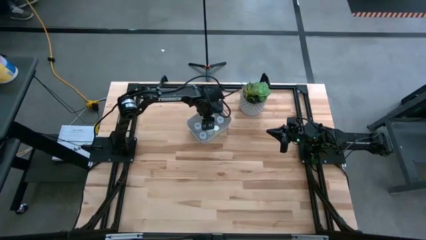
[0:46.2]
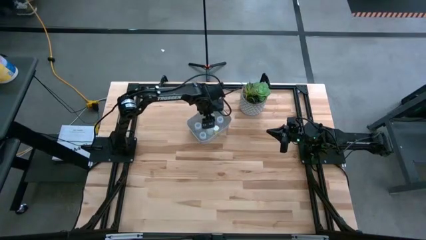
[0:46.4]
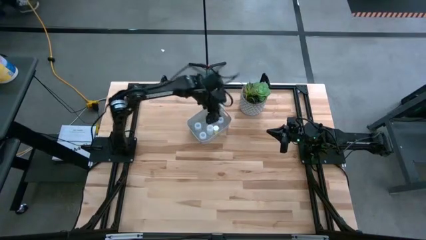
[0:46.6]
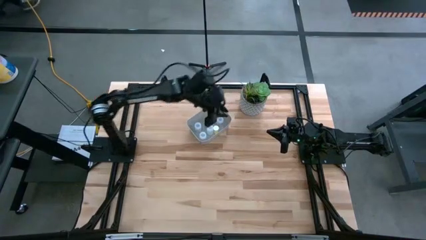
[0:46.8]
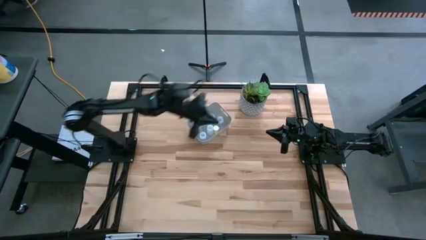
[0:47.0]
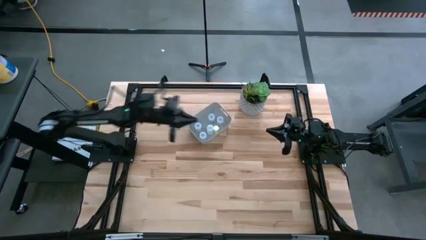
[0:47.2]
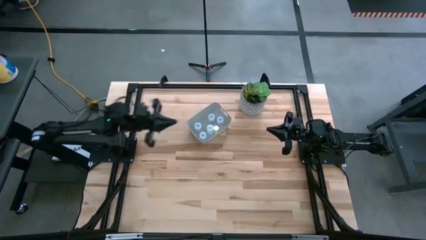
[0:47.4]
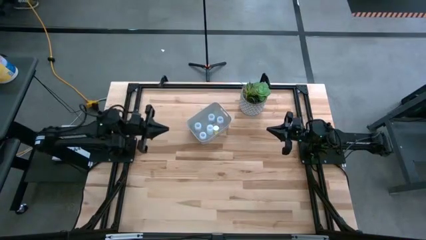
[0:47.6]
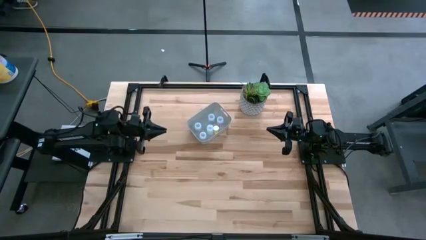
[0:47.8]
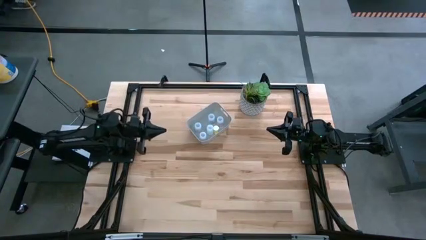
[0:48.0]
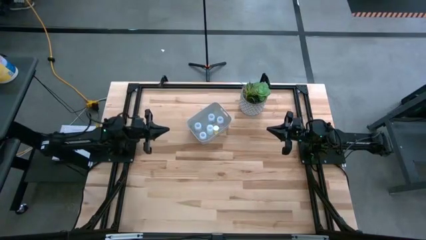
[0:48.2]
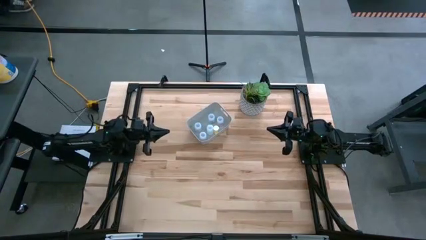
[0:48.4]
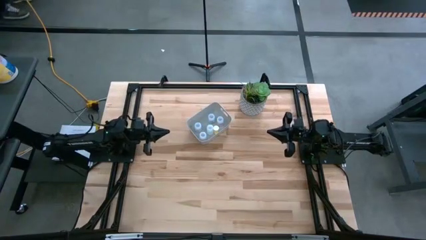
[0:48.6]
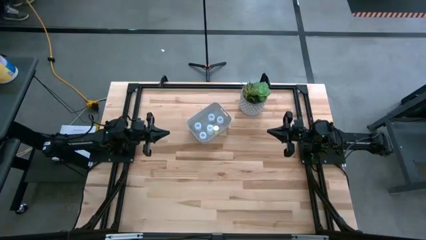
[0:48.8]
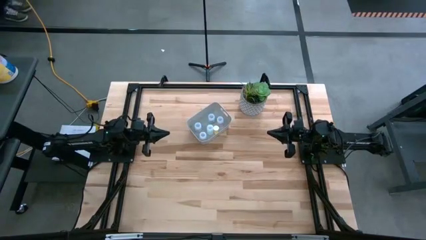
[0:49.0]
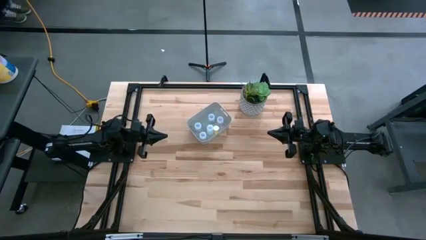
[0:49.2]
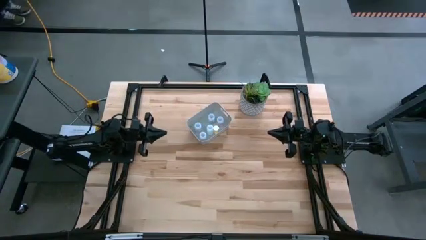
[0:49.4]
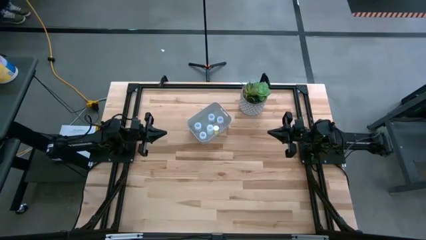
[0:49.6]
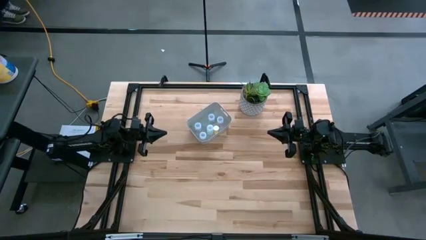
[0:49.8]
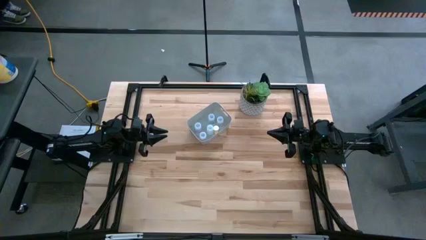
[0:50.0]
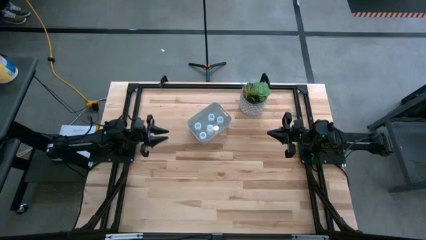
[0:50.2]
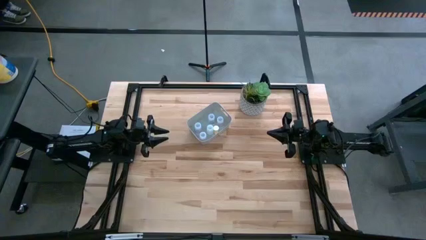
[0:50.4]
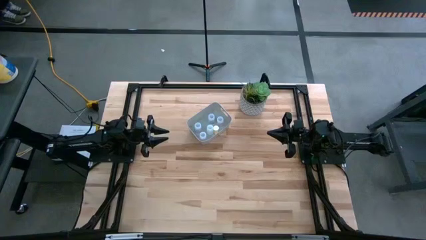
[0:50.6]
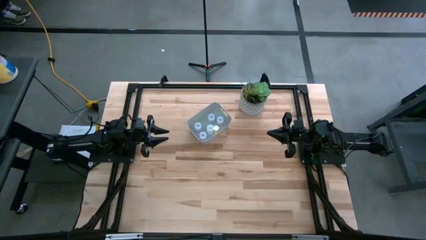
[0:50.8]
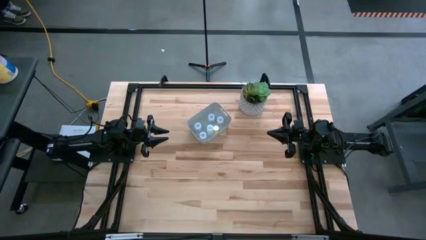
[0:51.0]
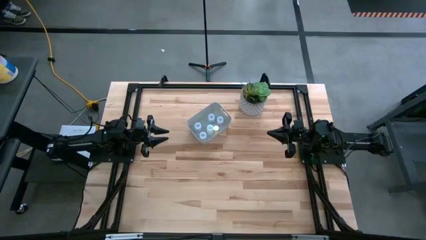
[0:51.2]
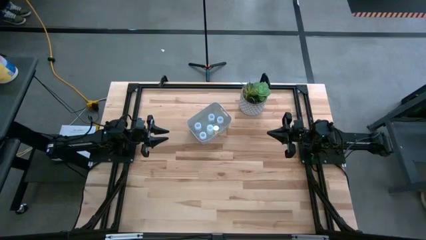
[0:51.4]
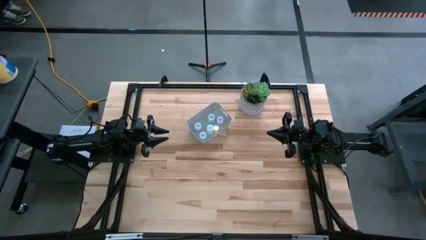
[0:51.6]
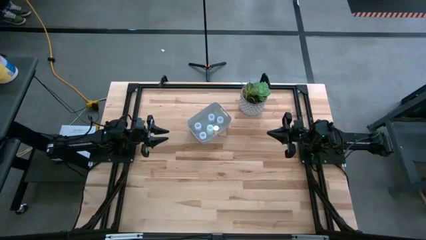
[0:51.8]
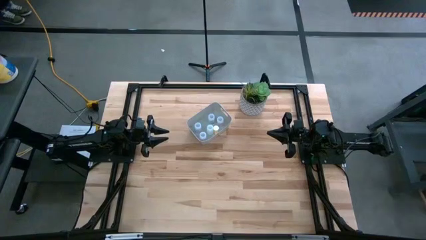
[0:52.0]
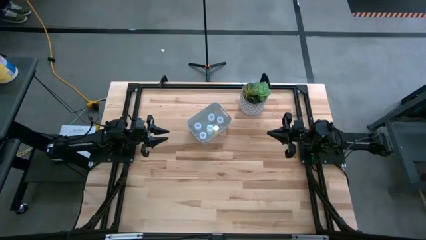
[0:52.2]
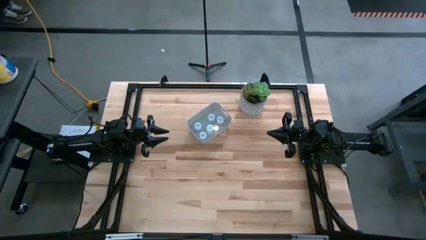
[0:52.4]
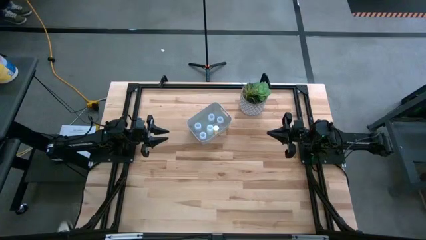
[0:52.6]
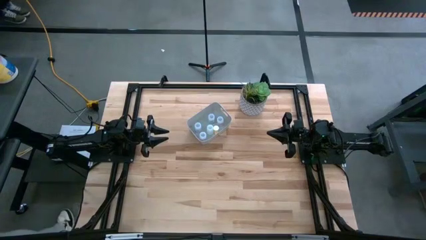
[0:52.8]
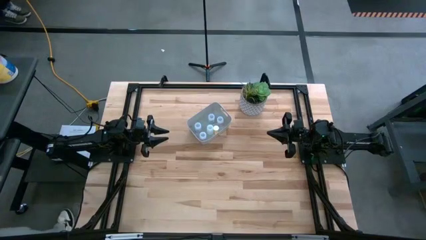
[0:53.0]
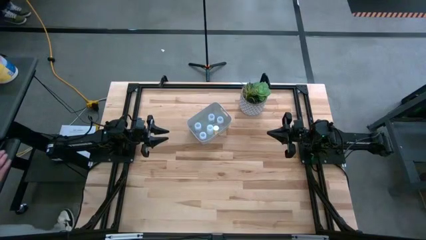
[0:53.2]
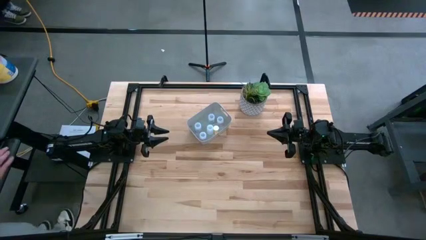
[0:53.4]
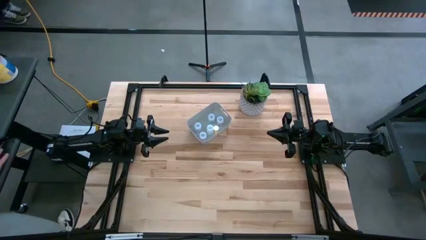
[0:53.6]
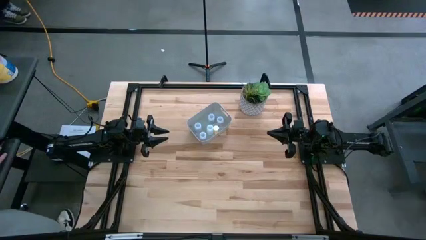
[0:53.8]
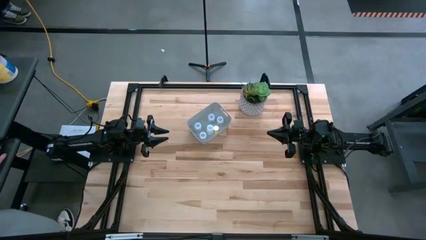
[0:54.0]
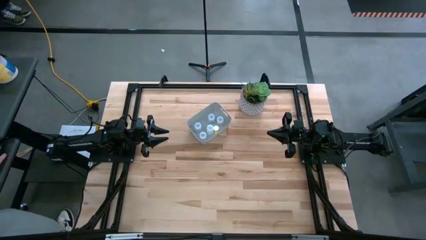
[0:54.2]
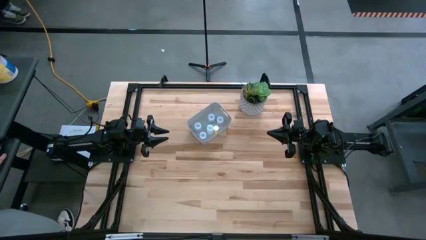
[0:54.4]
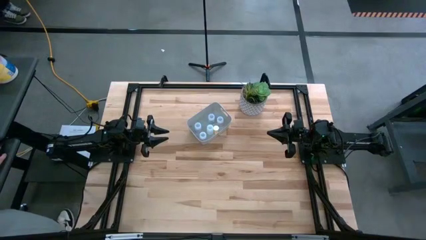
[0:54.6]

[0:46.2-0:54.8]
Task: Pick and place pill bottles into a basket
Return to Home Position

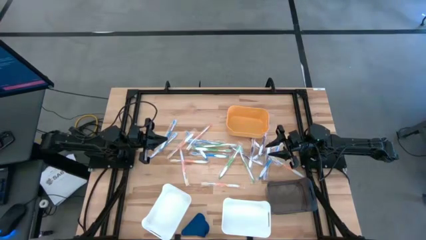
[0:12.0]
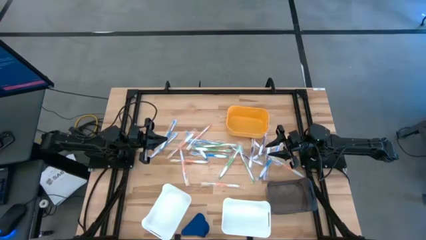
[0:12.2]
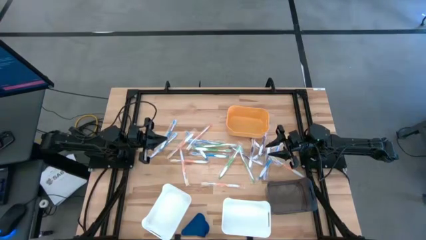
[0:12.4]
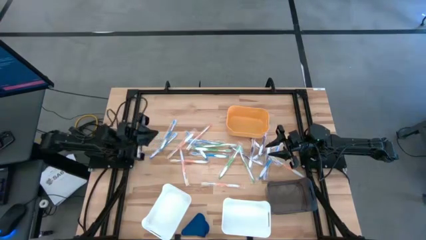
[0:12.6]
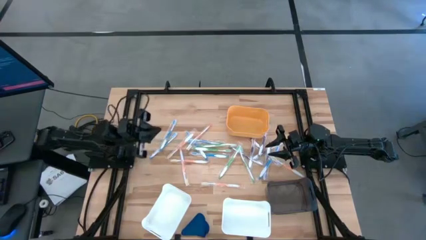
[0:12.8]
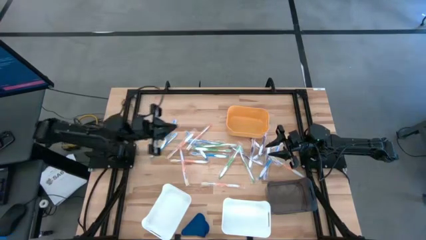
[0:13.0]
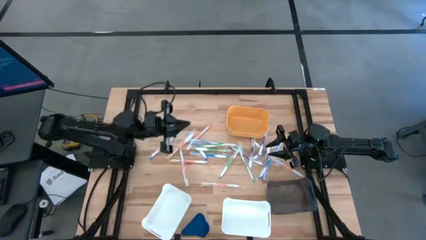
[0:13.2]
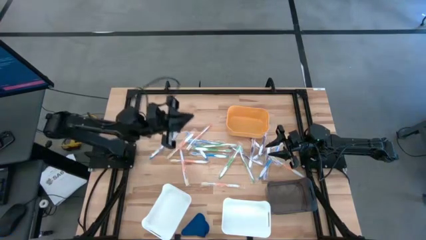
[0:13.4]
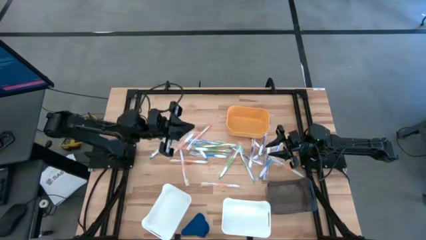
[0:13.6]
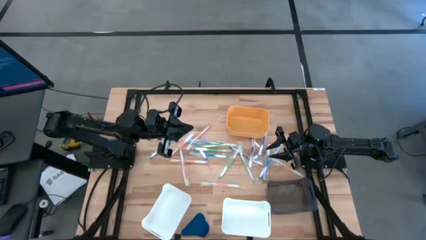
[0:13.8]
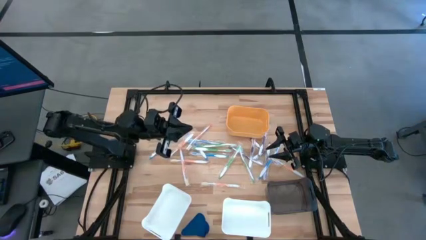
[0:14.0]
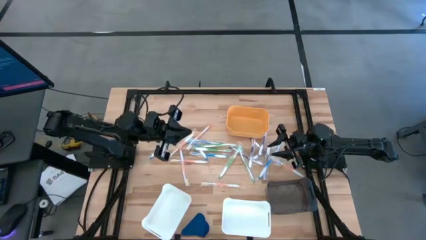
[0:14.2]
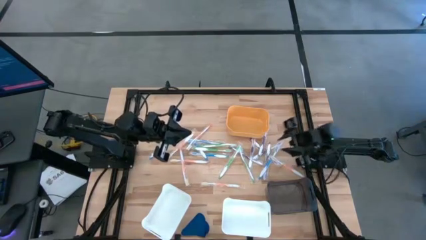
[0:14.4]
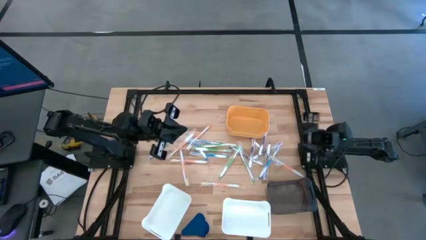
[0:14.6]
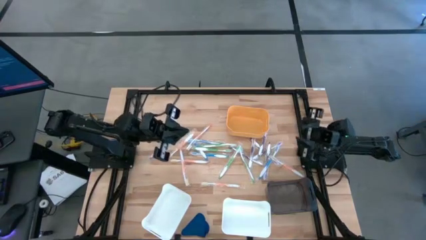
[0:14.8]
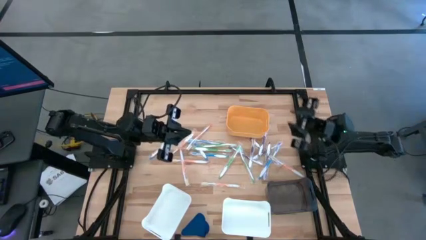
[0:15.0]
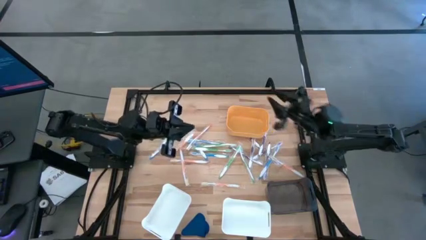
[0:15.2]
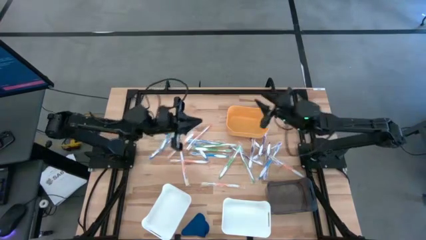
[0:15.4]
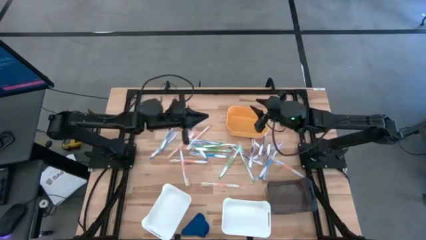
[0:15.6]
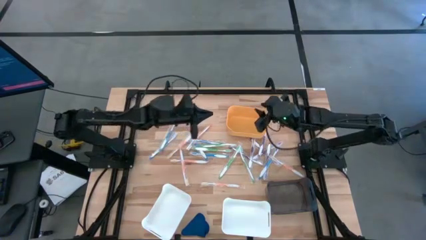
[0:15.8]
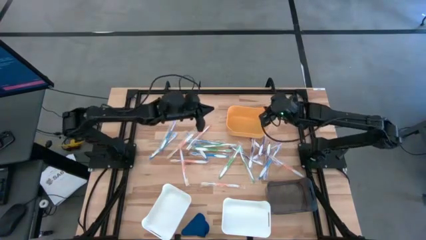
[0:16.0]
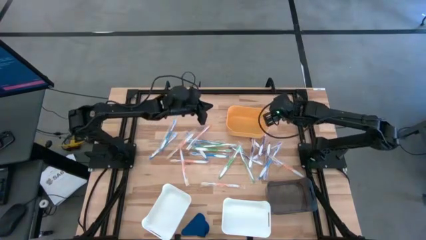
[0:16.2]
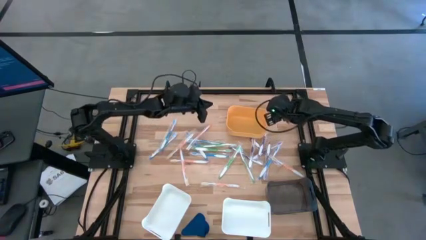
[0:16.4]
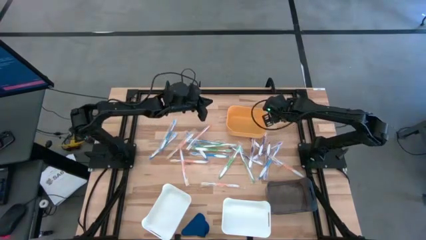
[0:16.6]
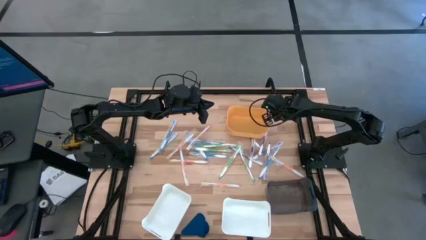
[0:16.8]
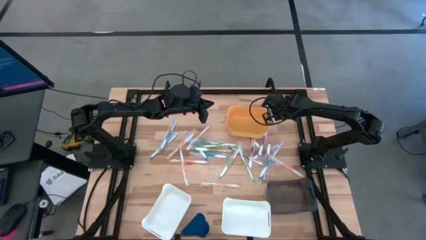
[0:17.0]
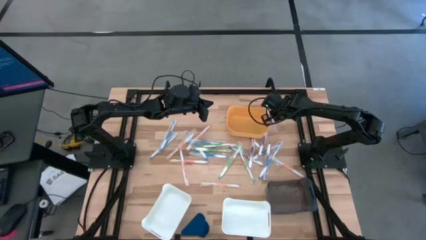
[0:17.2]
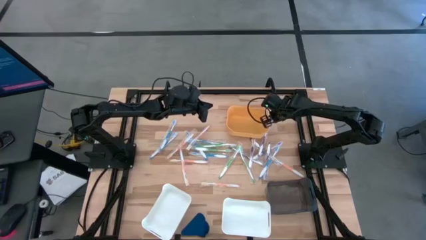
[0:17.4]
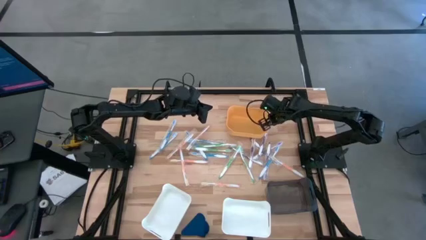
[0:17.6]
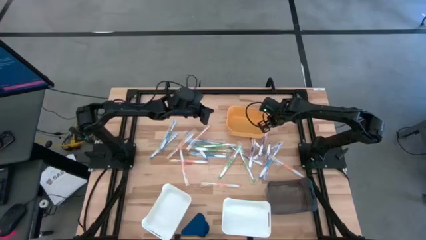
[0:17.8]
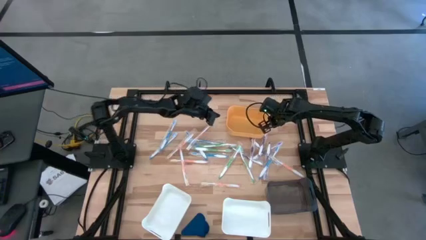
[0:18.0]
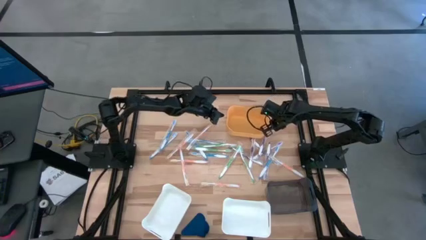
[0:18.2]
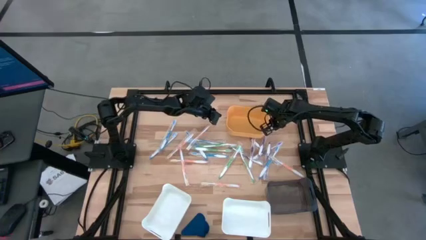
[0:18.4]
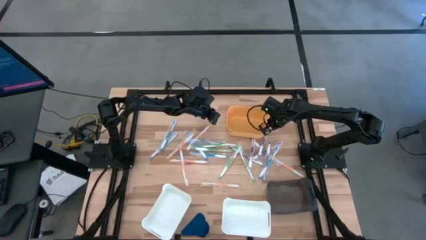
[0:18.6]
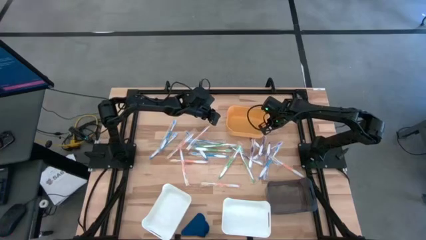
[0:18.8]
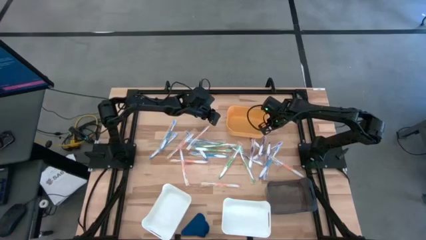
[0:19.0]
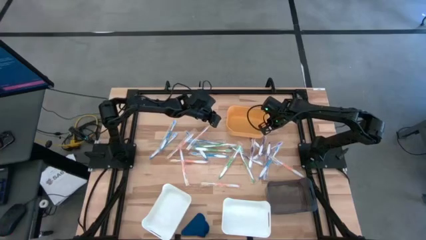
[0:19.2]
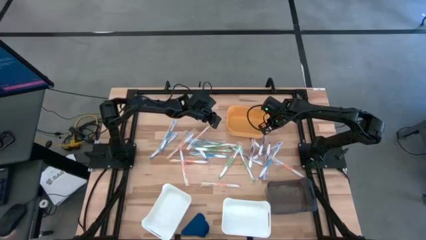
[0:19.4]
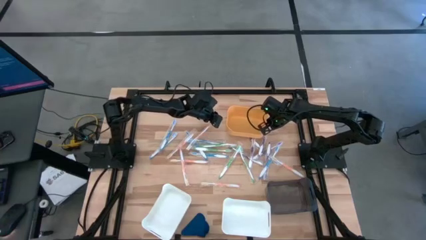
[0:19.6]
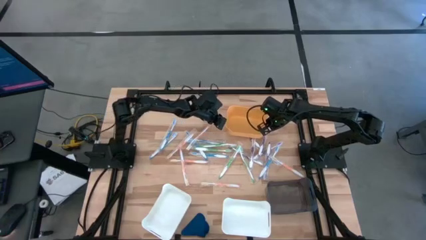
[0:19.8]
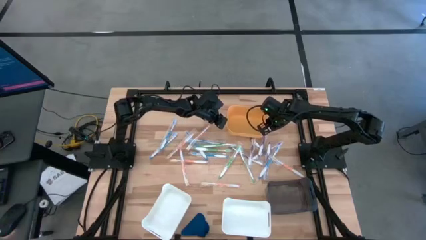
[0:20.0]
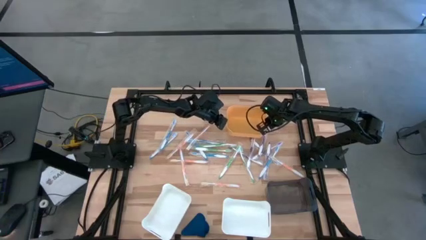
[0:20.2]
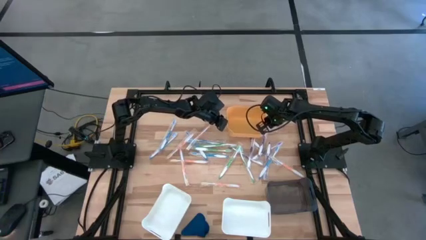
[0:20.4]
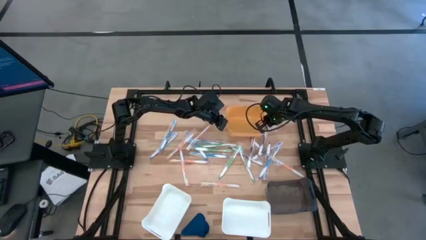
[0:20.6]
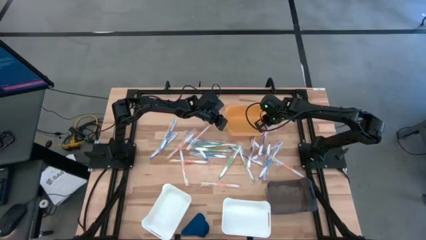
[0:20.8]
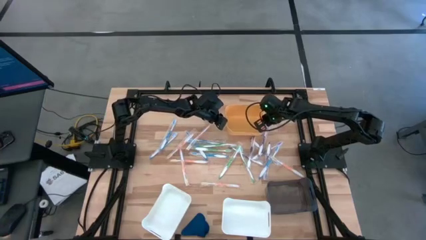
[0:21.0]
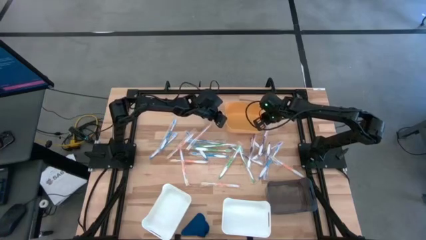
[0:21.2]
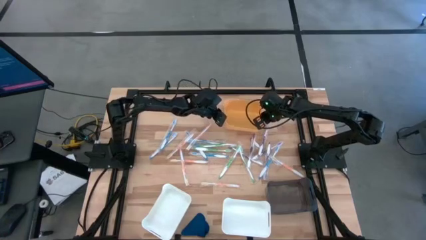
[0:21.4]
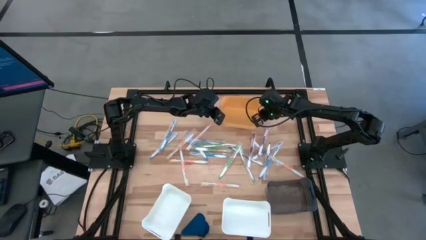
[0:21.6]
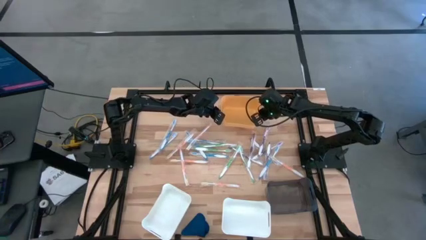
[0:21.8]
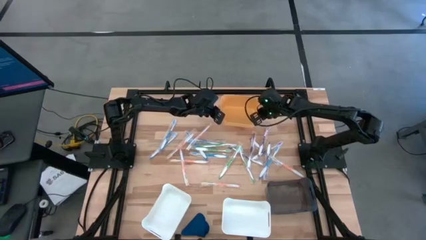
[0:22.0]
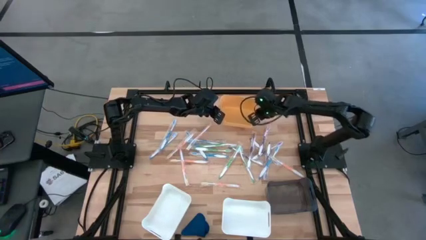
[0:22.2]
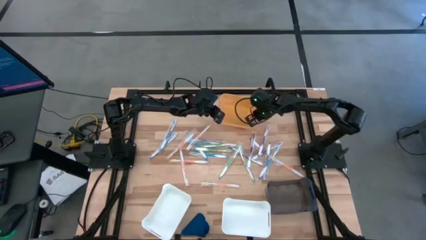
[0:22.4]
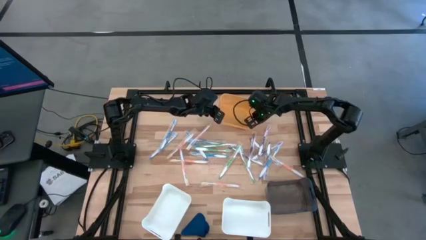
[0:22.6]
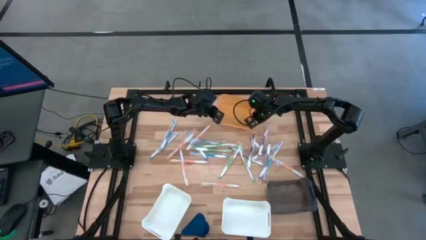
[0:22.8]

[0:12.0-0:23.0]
Task: Pick & Place Toothbrushes
Move the yellow bin to the top center of the table
